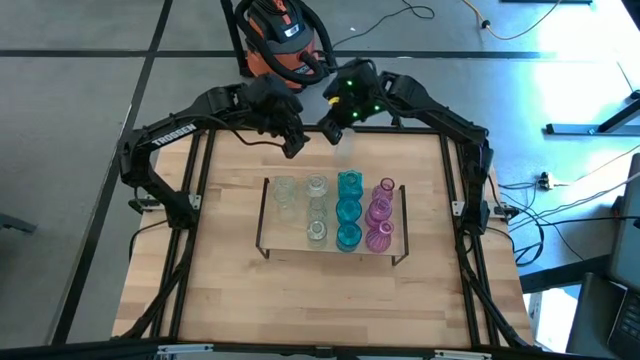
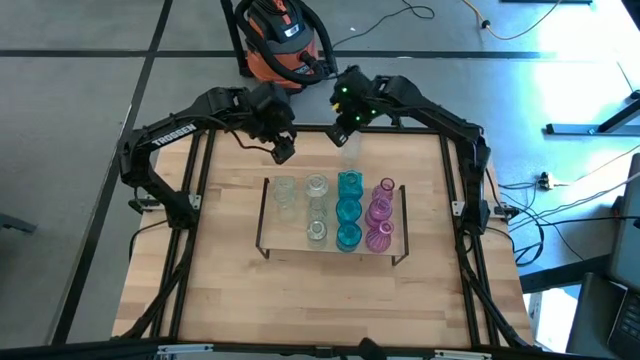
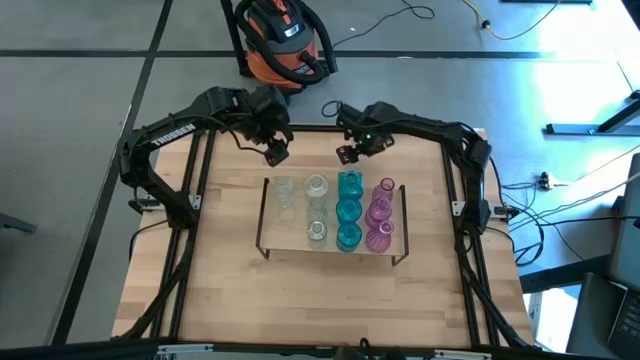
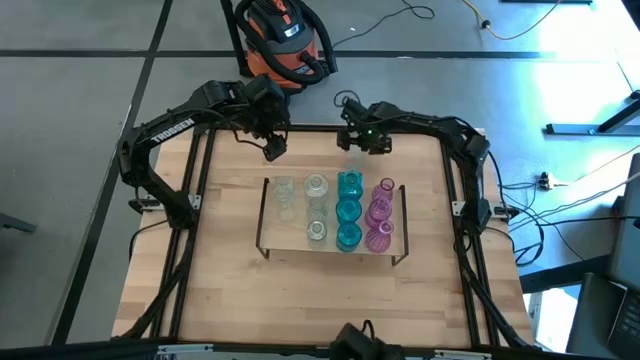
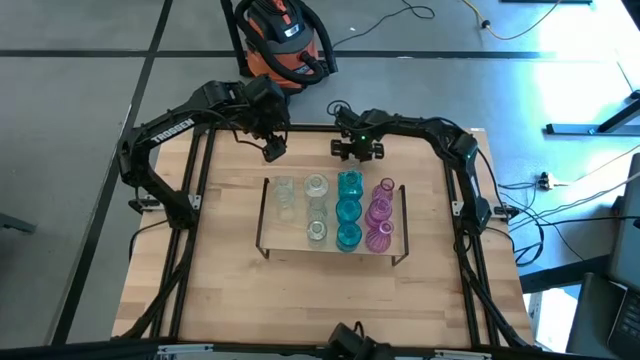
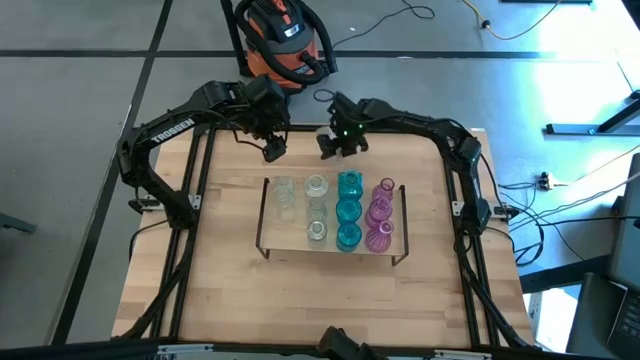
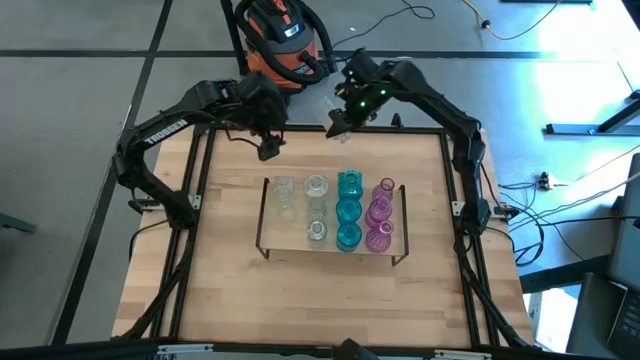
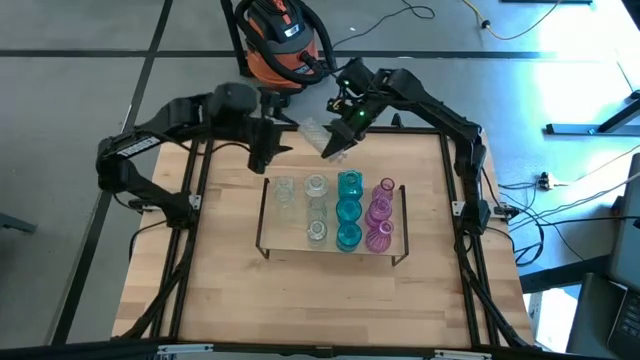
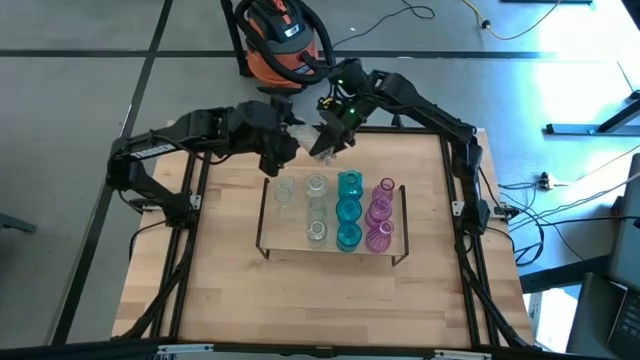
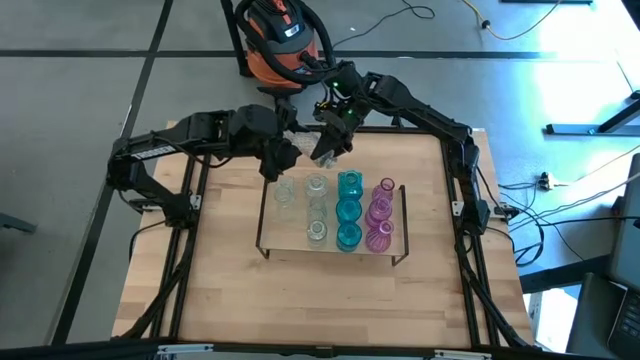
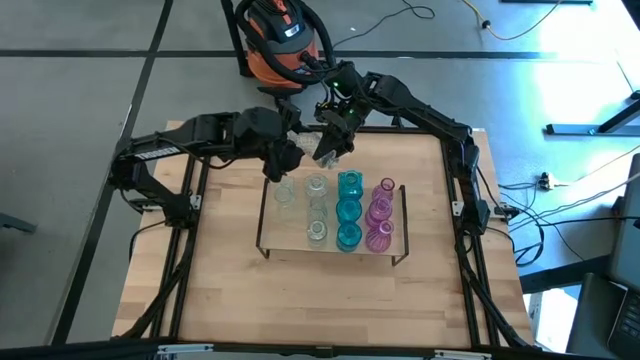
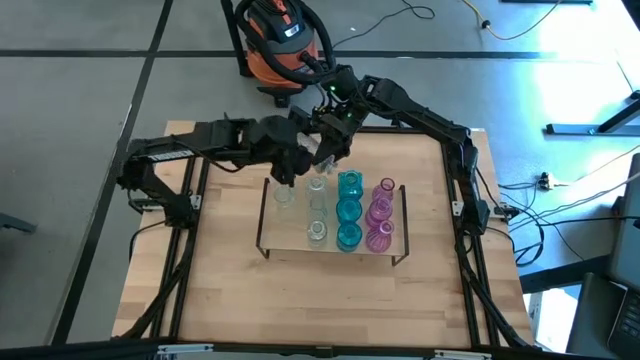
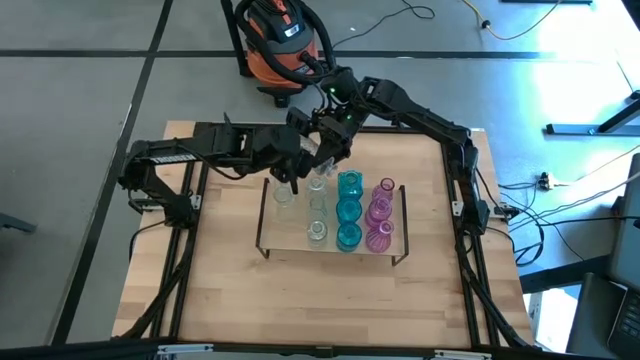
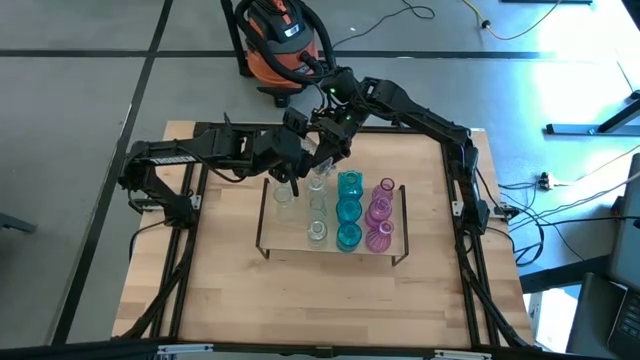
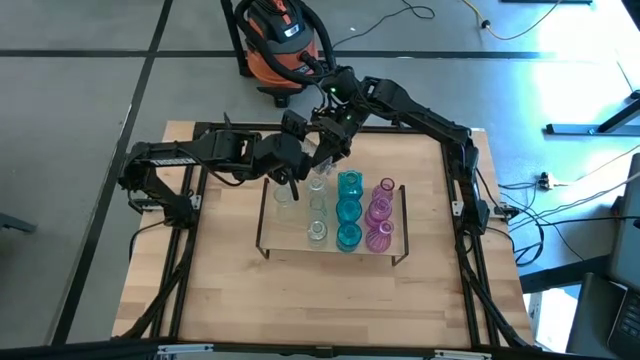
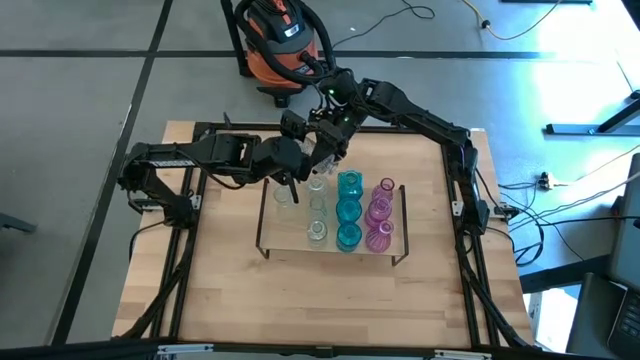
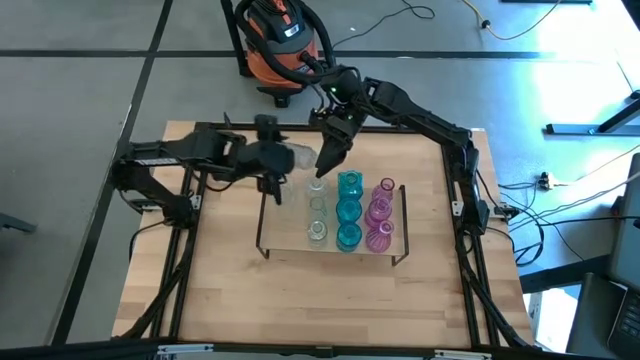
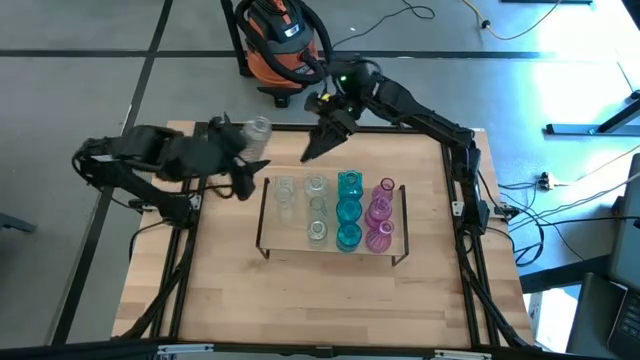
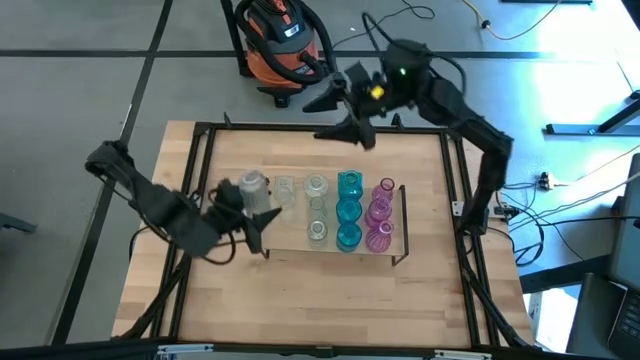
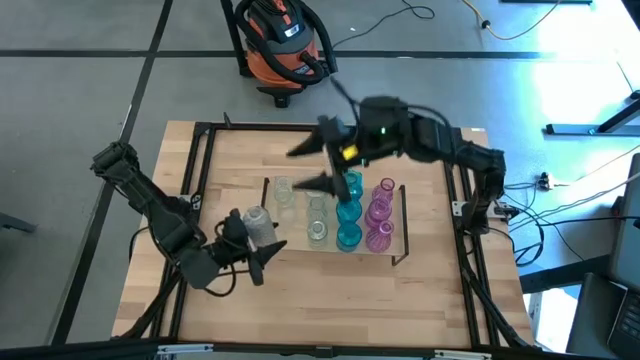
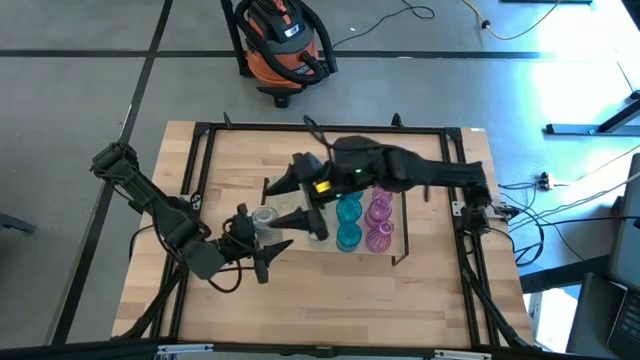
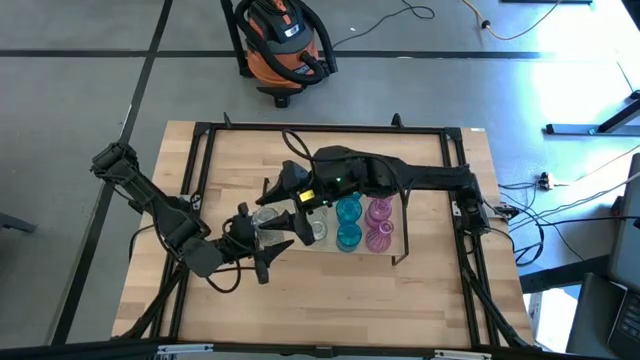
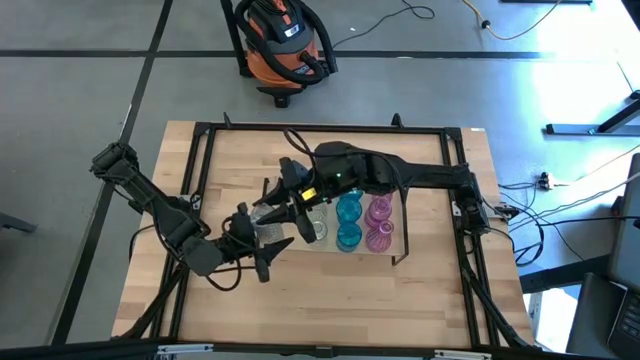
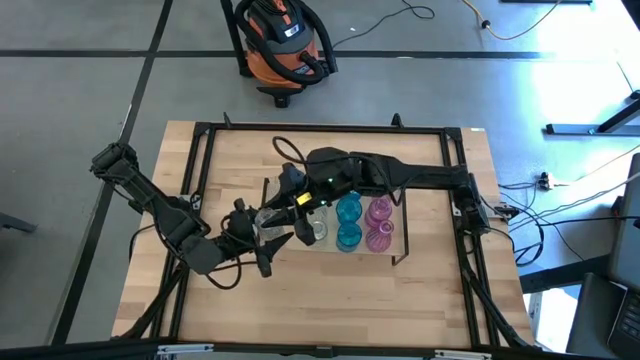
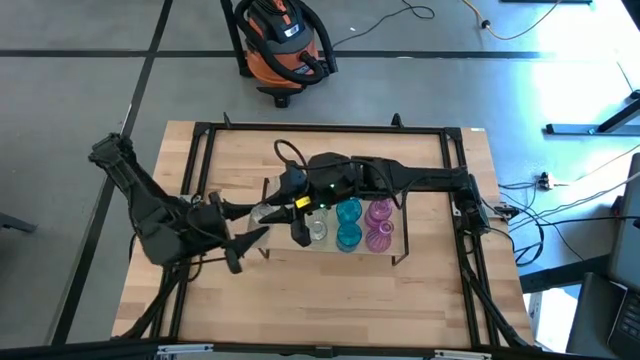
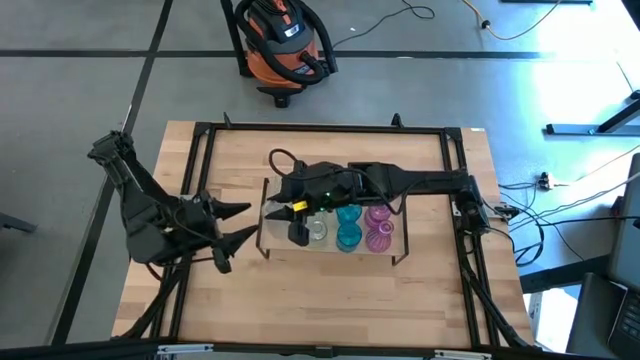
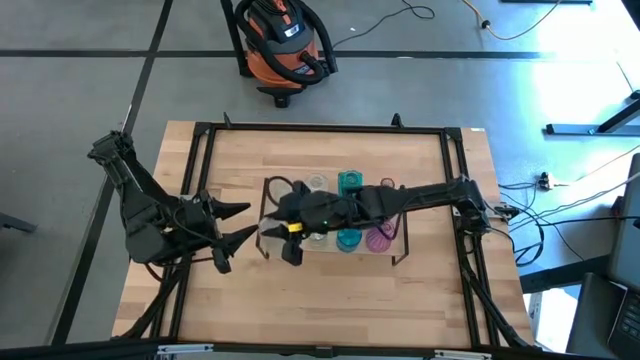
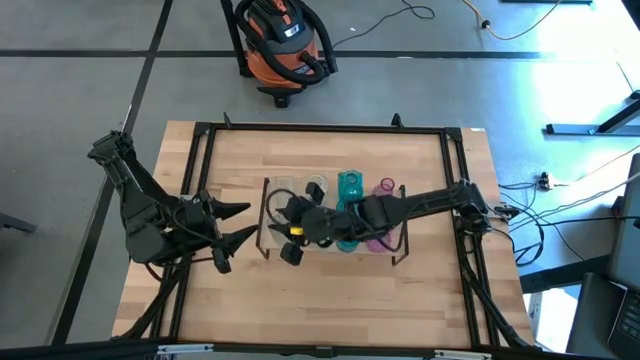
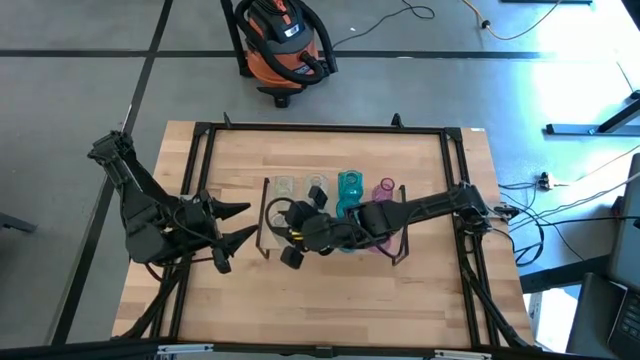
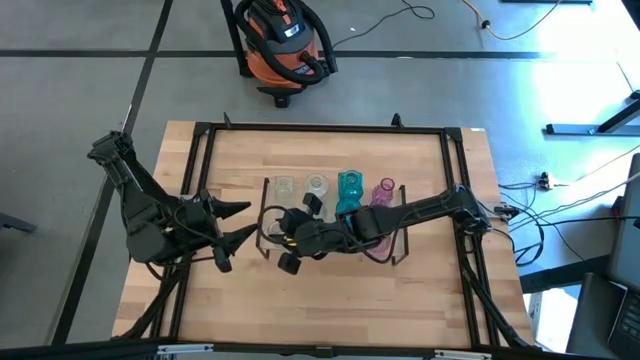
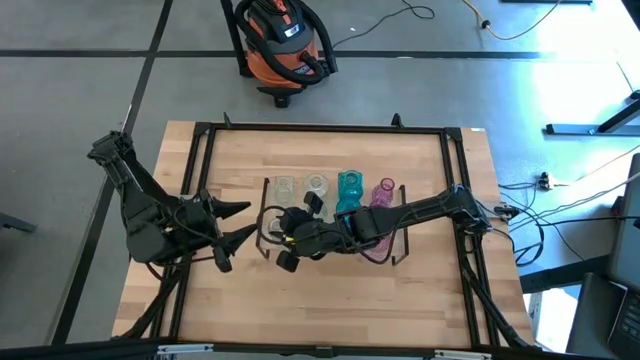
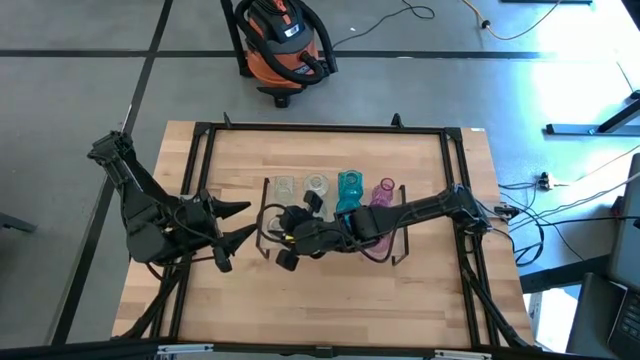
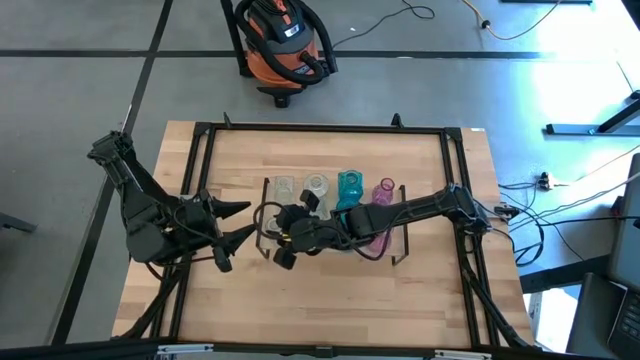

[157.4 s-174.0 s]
Task: sort vases onto shelf
Put the transparent vase on the shelf

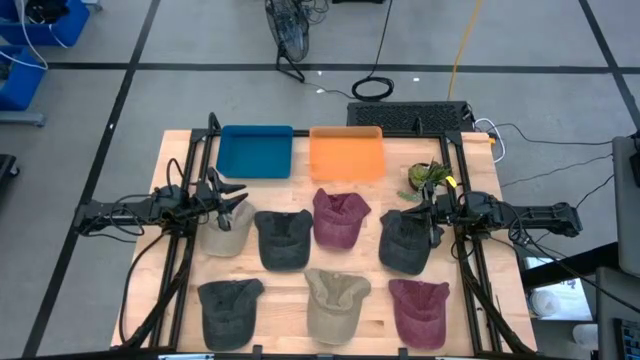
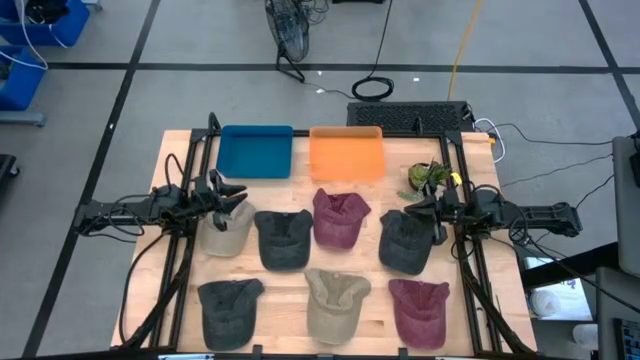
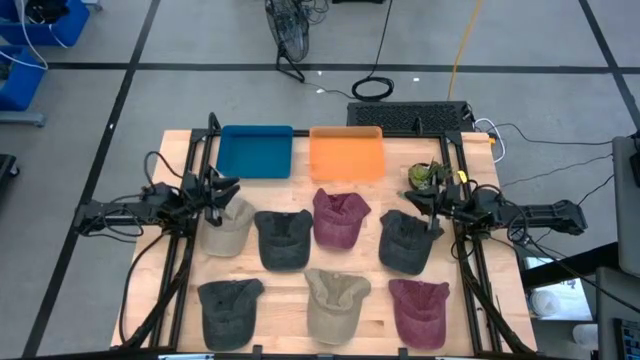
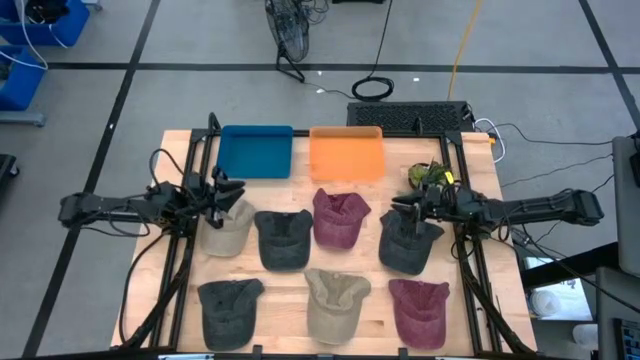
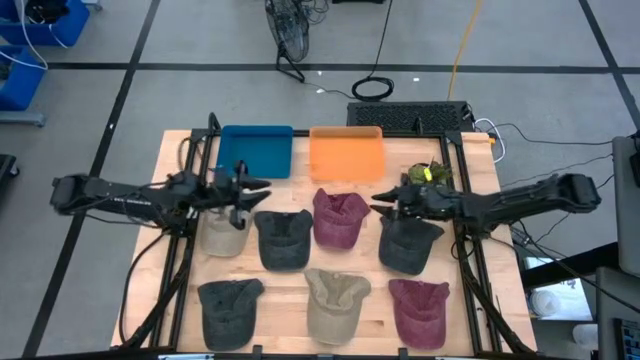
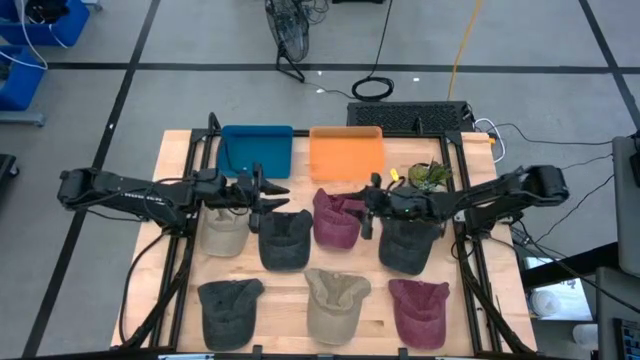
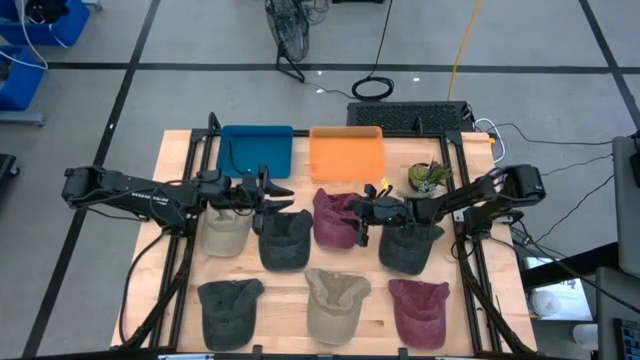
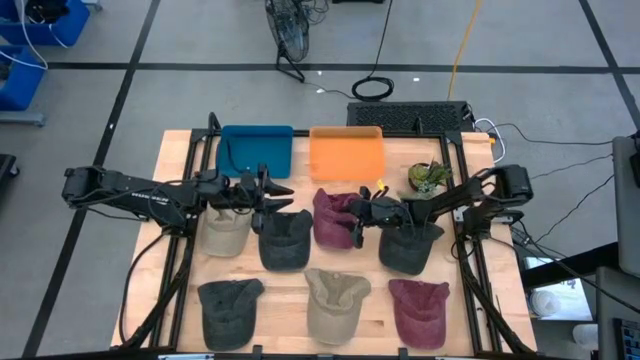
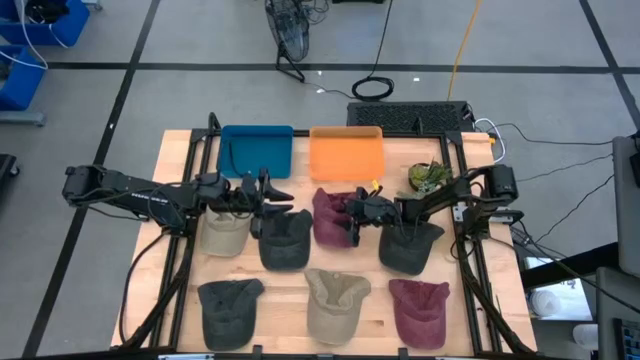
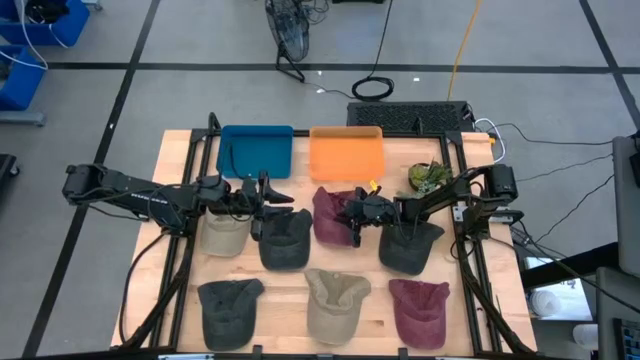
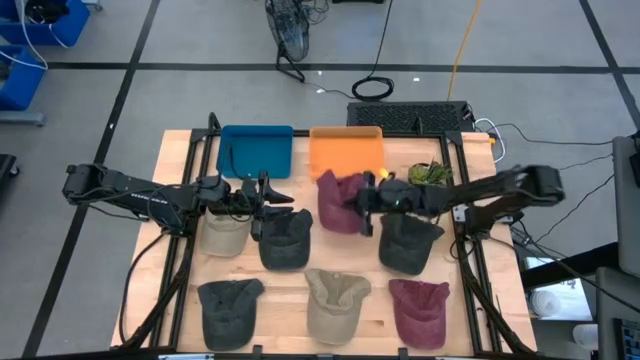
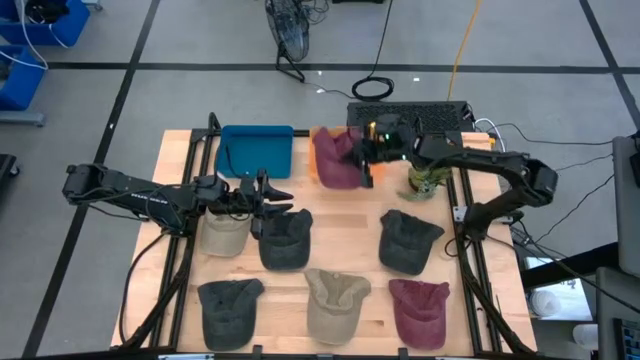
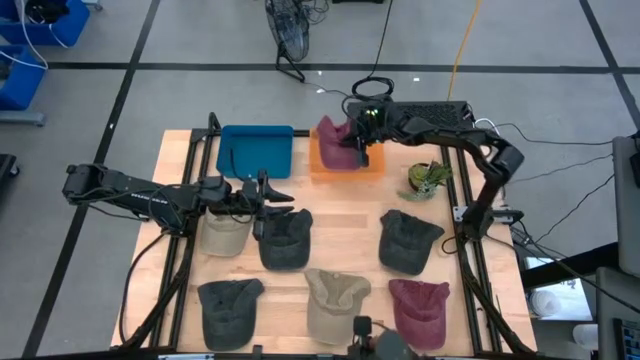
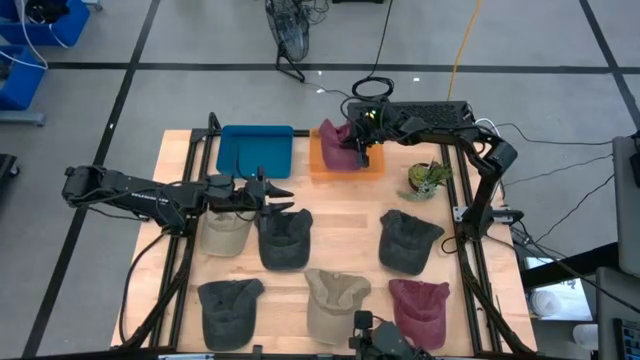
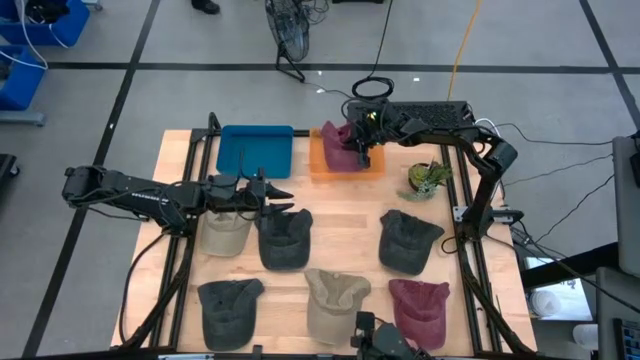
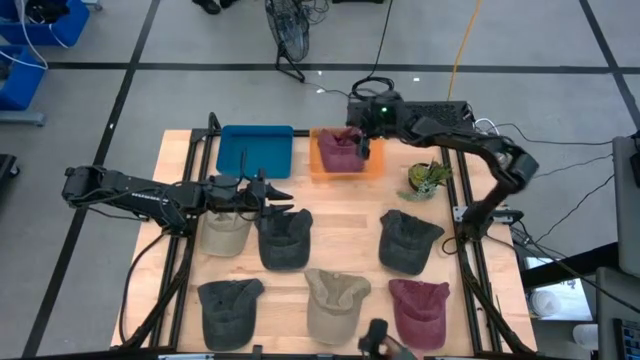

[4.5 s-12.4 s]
Task: Pick & Place hat
Put the top red cap into the orange bin
